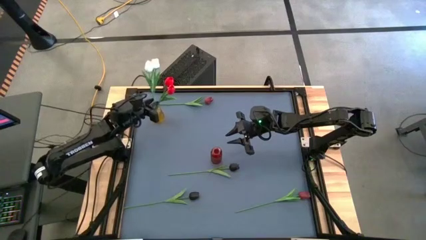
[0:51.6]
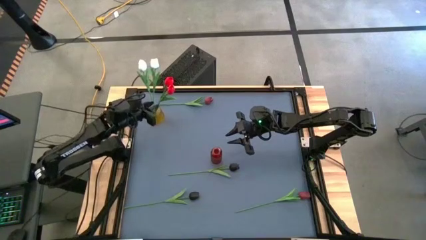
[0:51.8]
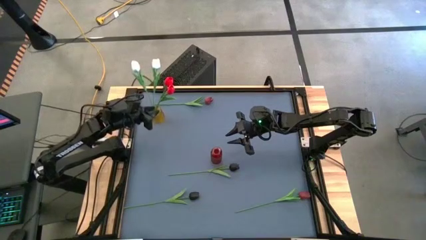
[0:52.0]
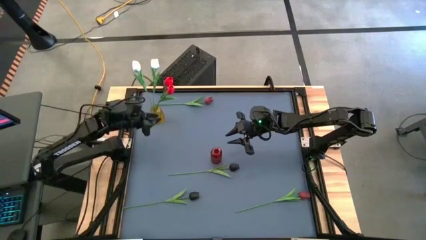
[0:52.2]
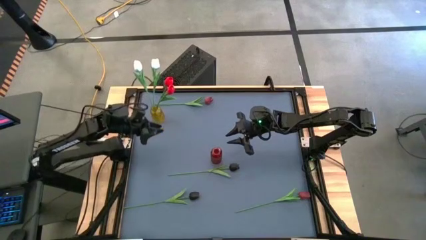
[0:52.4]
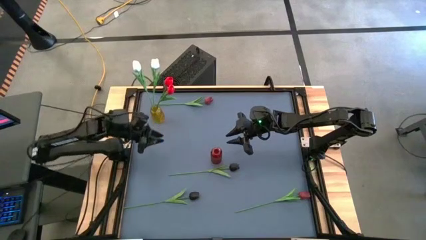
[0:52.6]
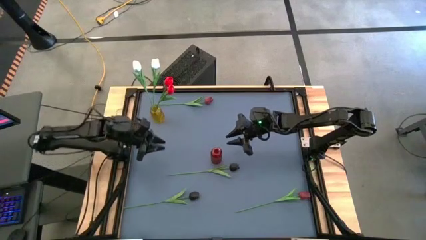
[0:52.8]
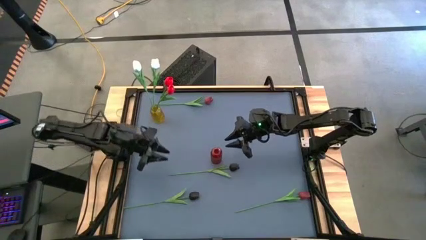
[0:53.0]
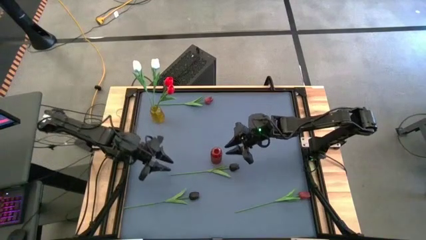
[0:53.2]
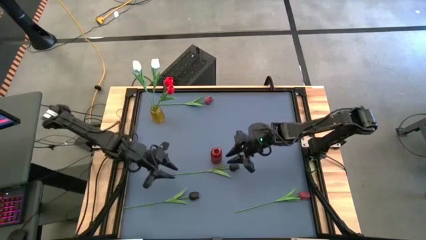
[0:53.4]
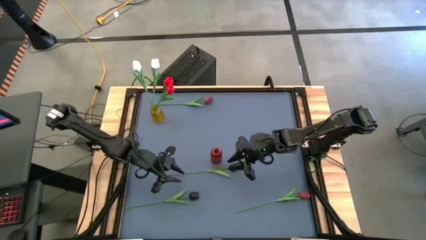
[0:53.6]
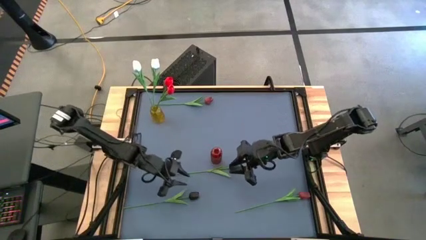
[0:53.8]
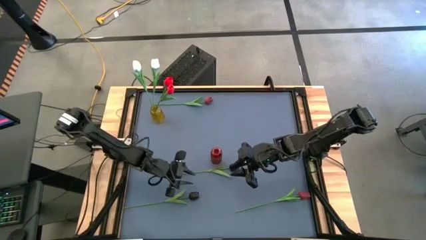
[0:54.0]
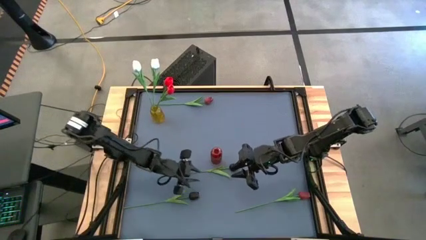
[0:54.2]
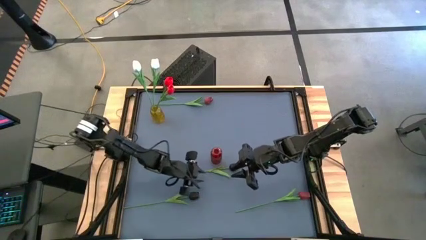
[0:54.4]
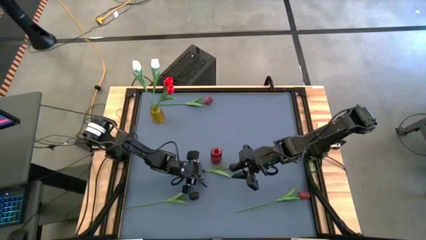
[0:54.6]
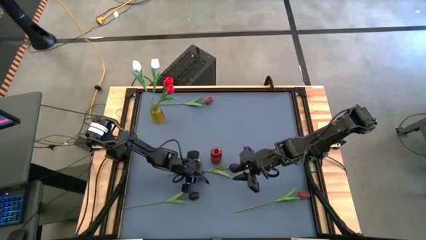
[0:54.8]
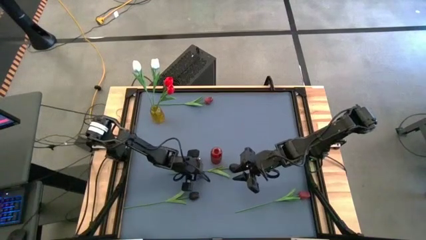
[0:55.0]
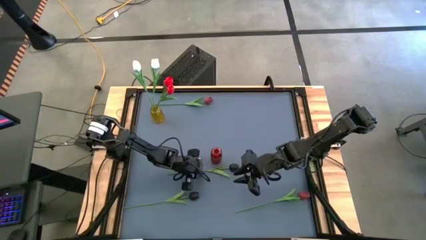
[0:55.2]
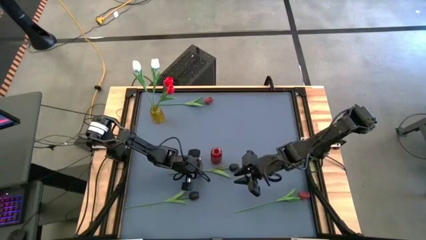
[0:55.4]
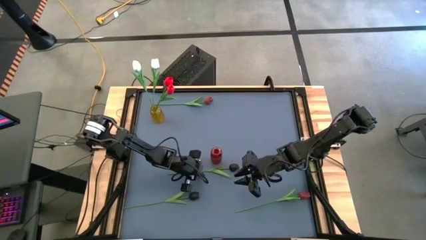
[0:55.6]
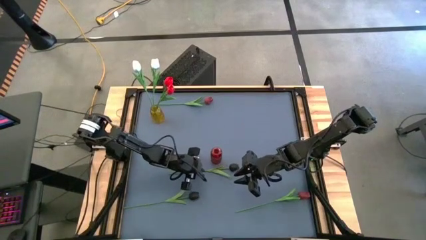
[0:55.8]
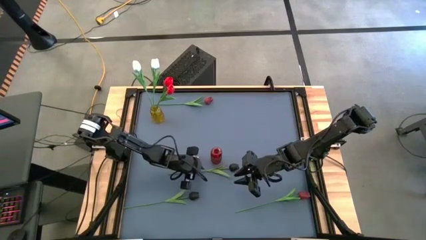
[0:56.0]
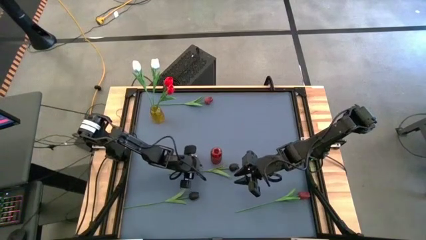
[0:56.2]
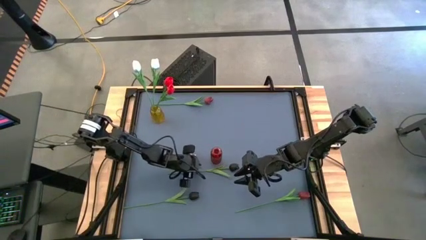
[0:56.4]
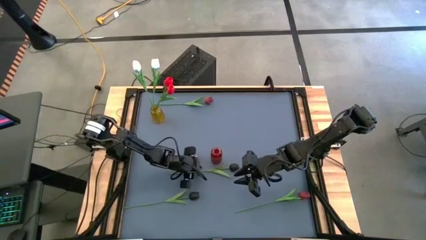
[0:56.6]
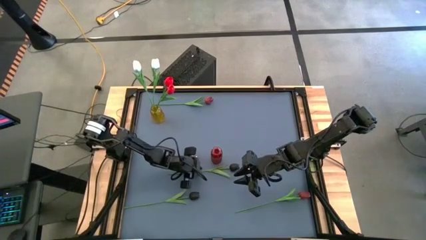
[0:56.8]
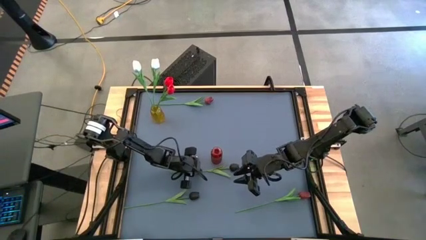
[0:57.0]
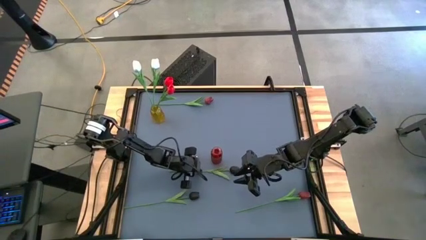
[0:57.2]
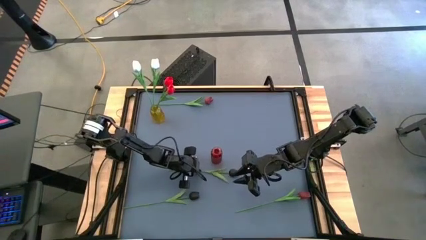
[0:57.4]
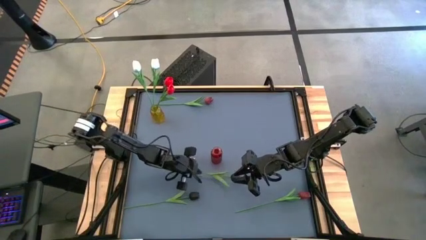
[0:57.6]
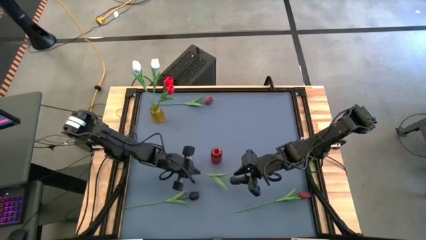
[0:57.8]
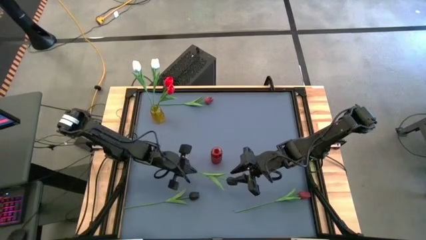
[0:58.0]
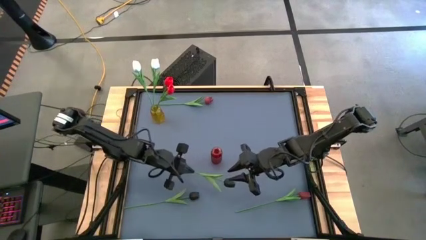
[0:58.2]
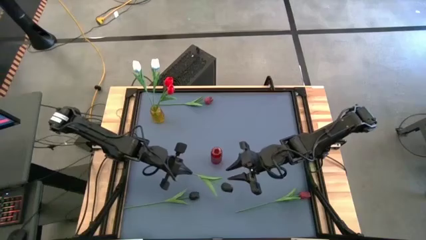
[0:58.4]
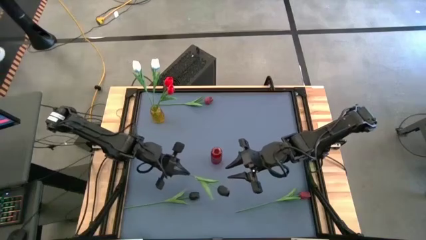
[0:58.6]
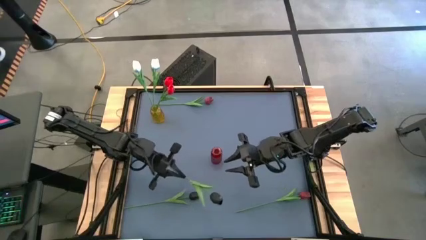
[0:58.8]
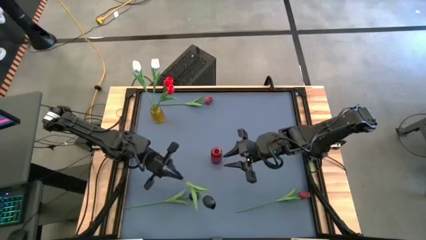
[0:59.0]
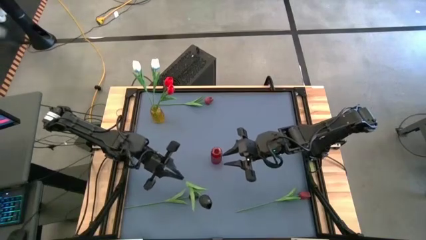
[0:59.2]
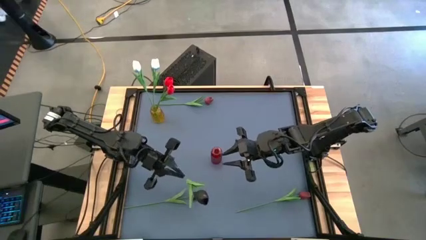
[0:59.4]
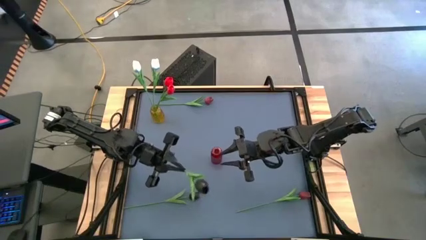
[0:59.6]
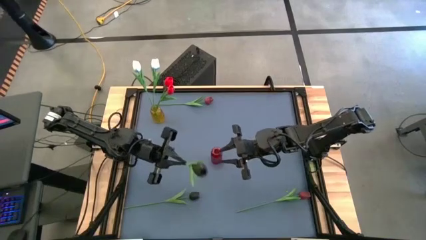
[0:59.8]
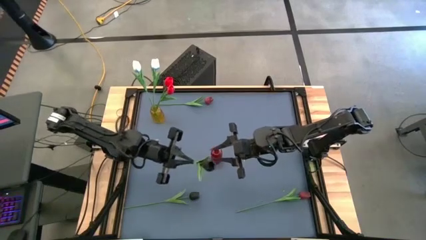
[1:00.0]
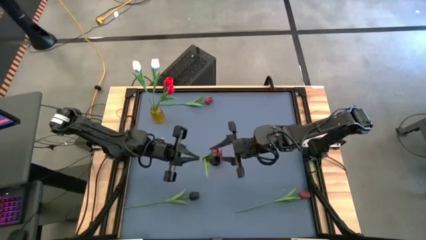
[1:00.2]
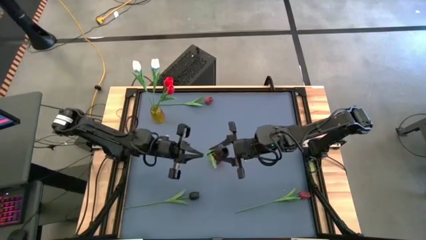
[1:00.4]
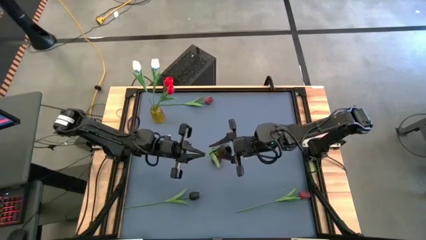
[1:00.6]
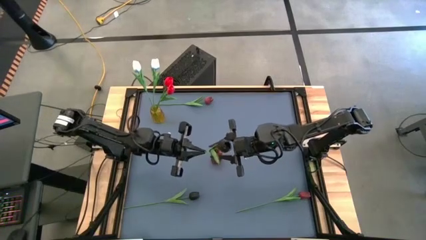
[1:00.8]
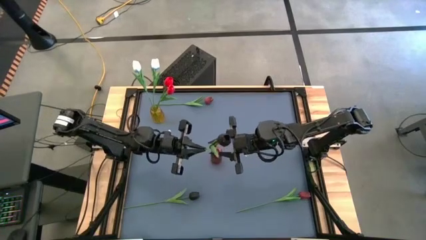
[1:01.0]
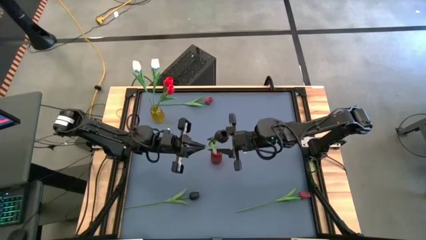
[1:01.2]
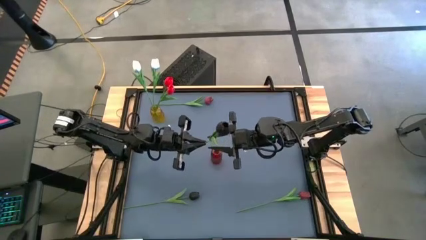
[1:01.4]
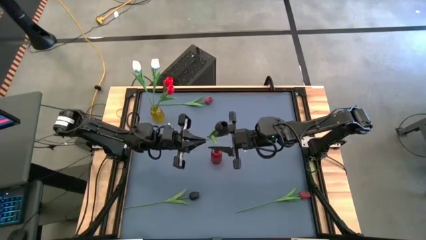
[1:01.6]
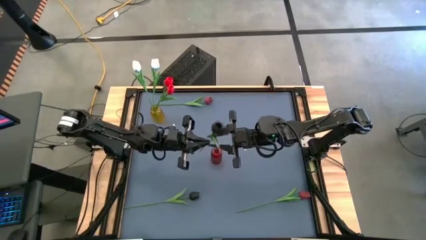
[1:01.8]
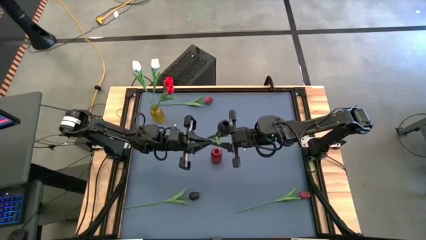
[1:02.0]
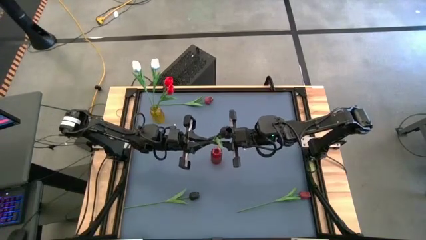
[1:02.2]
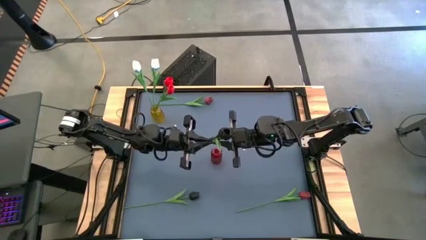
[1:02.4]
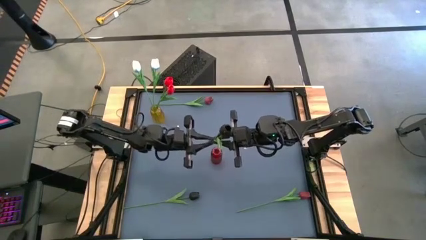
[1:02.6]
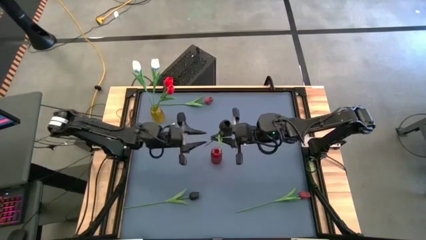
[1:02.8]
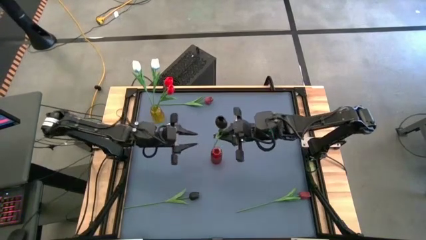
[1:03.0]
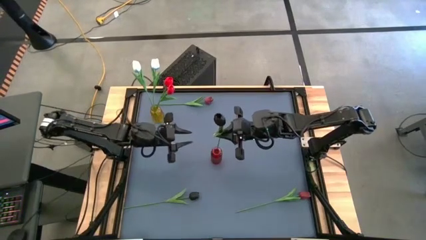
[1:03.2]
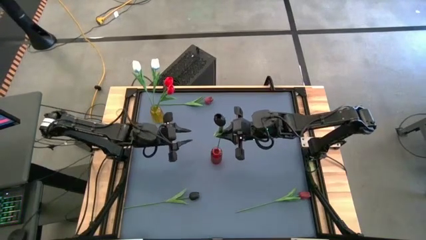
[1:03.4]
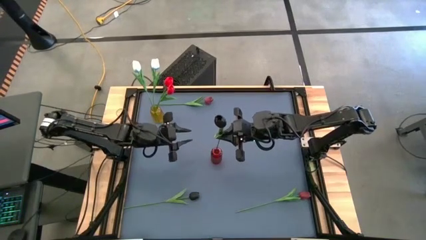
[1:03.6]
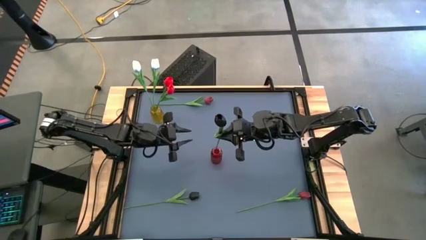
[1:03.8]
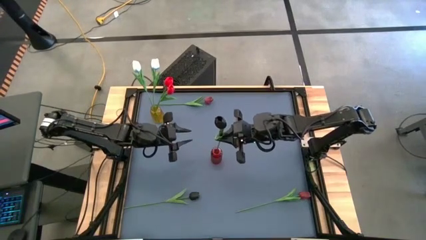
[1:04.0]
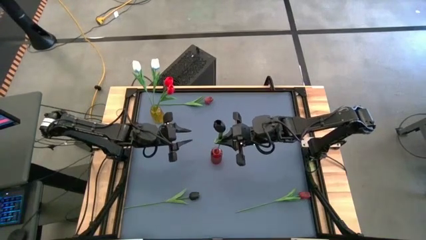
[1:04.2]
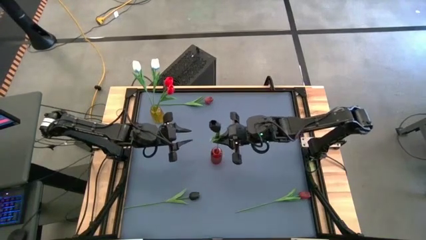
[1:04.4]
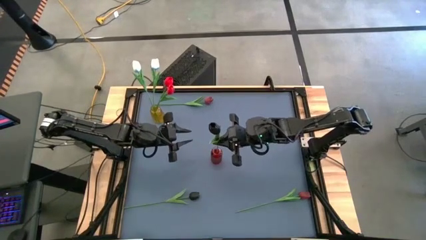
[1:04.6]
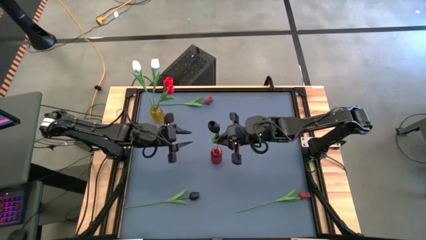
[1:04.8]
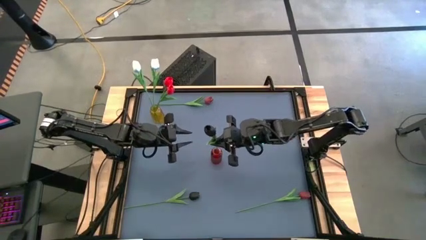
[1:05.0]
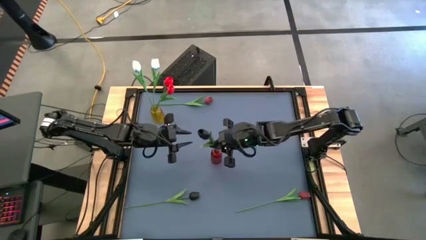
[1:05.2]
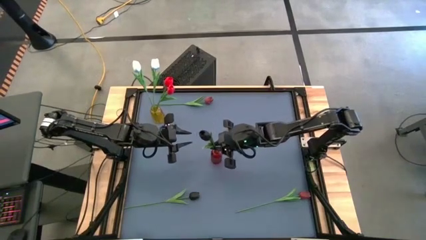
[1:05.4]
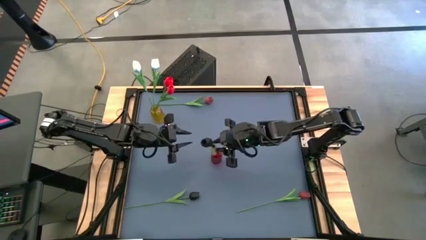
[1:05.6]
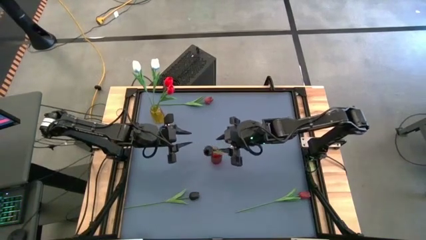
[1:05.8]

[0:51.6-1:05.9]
Task: Sort flowers into vase by color
Put the top black tulip into the red vase
